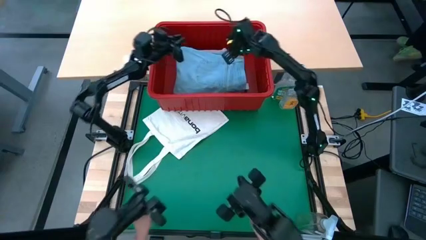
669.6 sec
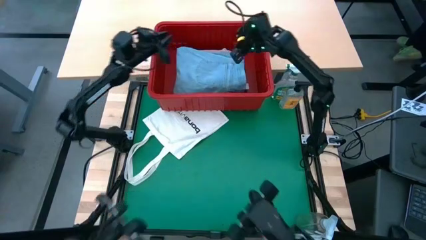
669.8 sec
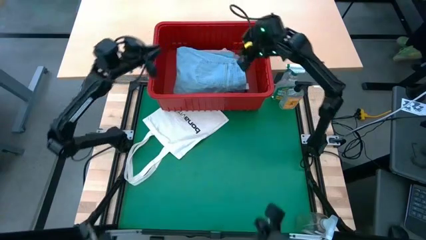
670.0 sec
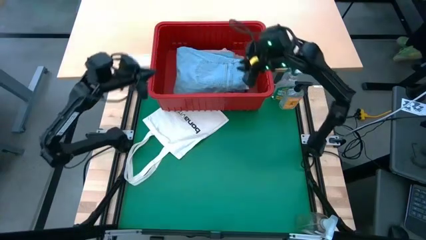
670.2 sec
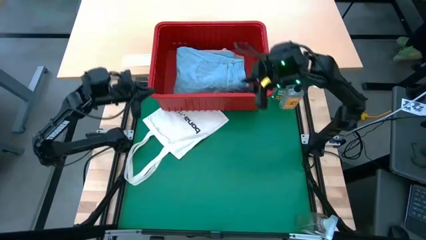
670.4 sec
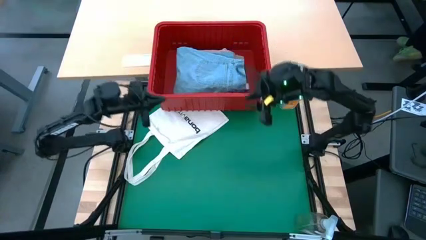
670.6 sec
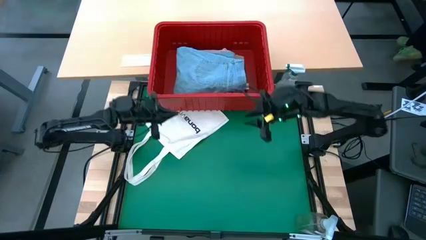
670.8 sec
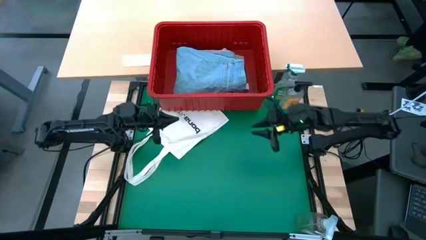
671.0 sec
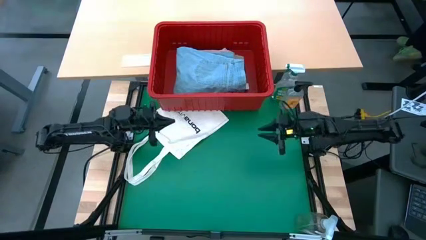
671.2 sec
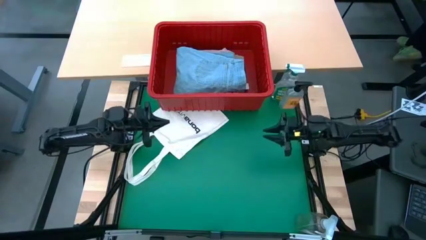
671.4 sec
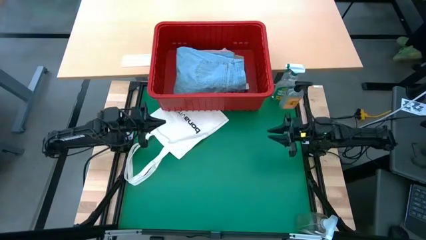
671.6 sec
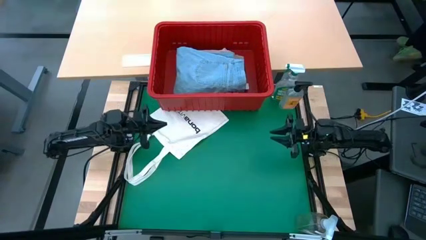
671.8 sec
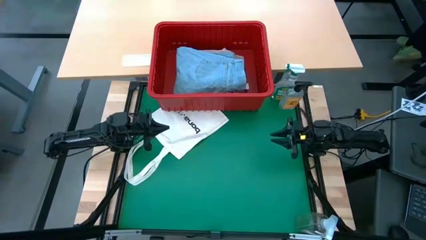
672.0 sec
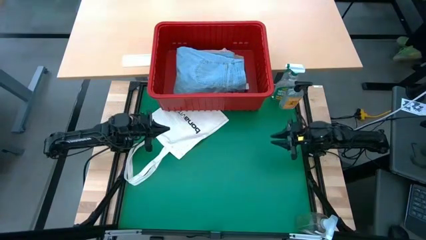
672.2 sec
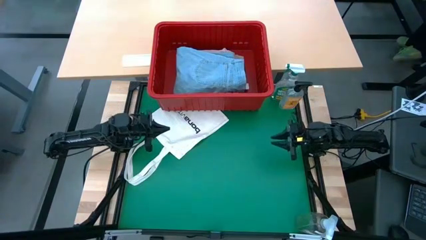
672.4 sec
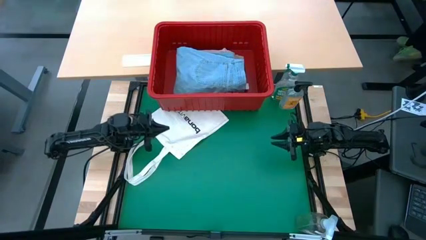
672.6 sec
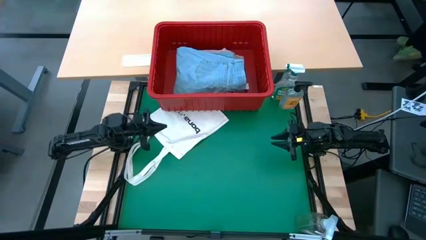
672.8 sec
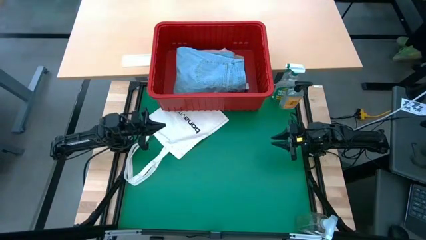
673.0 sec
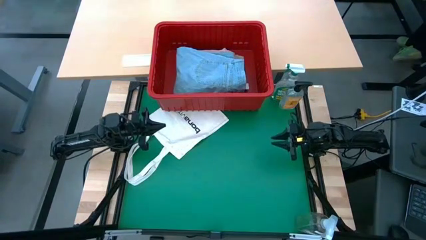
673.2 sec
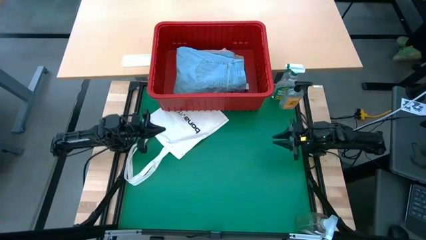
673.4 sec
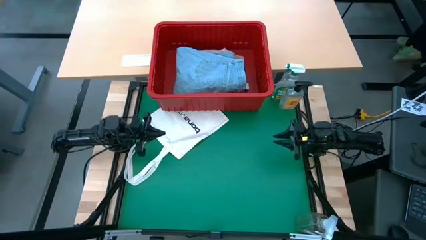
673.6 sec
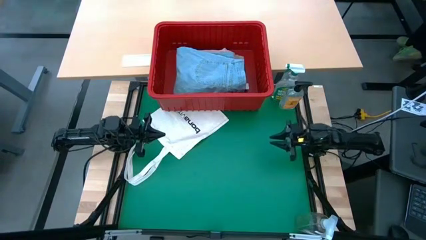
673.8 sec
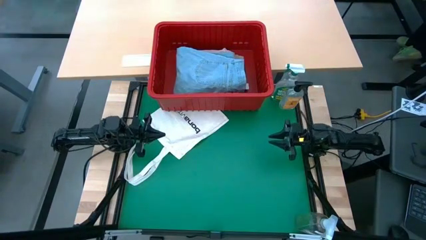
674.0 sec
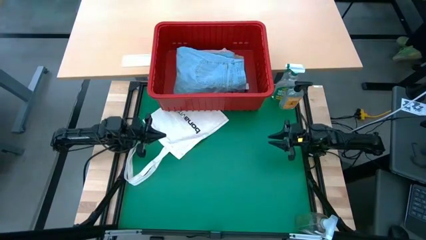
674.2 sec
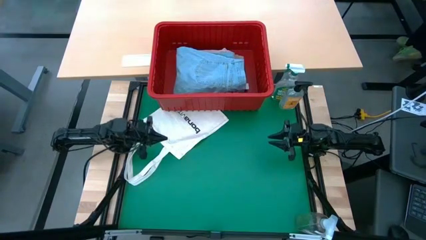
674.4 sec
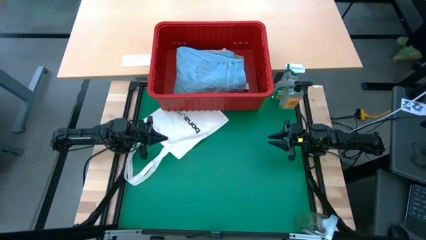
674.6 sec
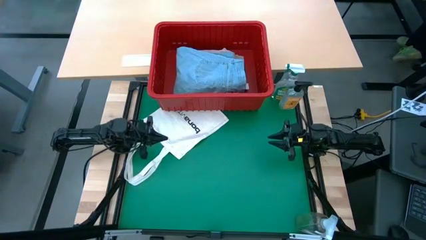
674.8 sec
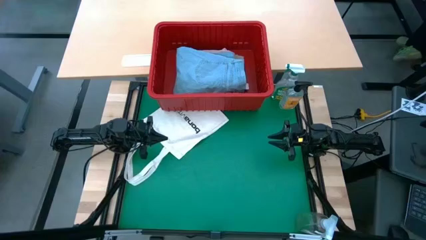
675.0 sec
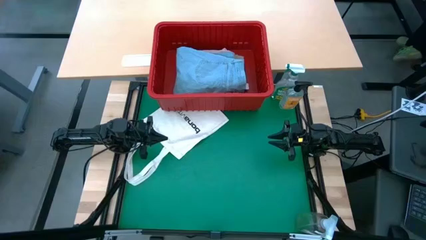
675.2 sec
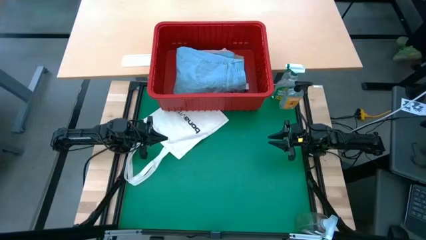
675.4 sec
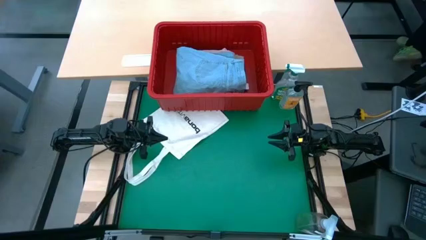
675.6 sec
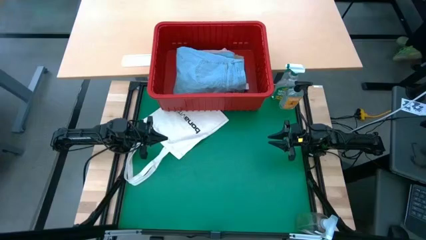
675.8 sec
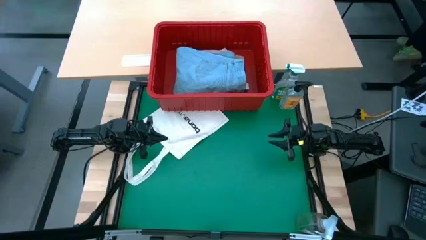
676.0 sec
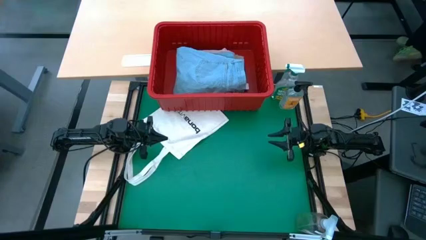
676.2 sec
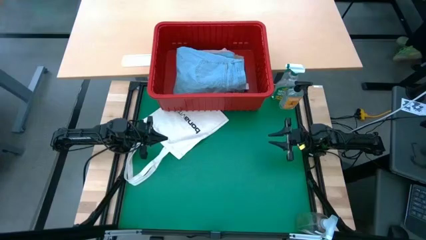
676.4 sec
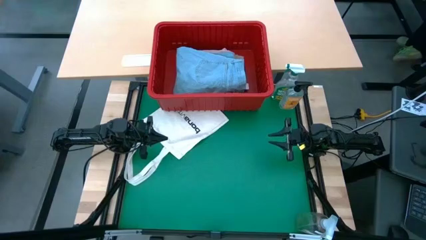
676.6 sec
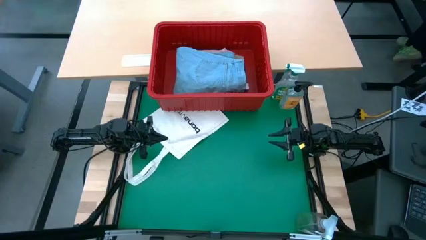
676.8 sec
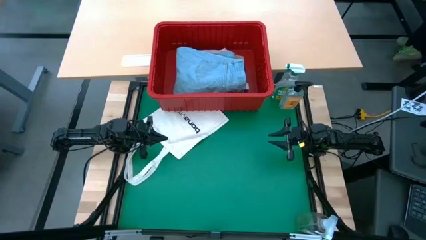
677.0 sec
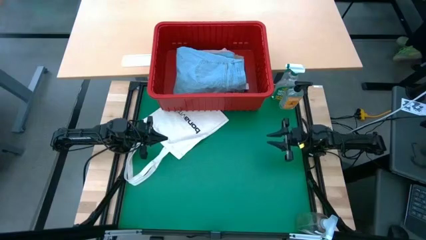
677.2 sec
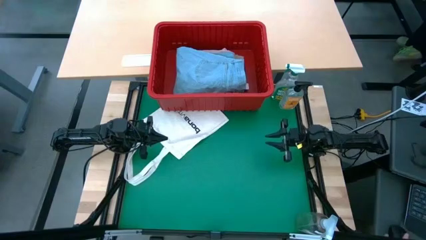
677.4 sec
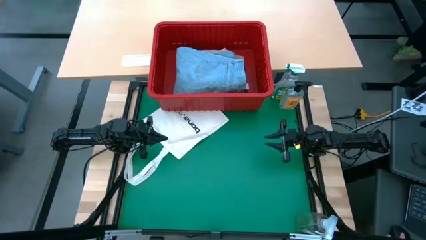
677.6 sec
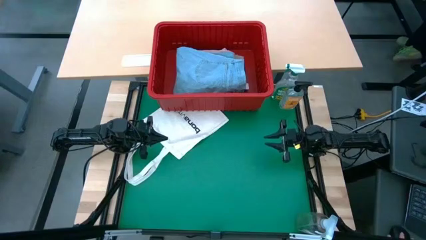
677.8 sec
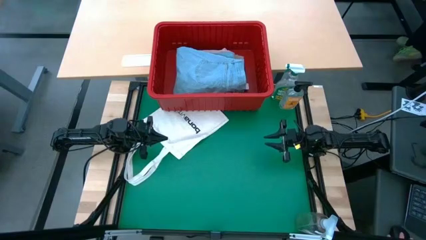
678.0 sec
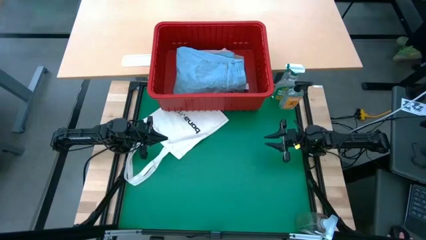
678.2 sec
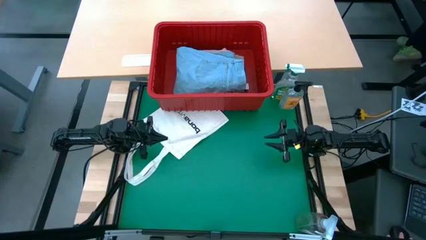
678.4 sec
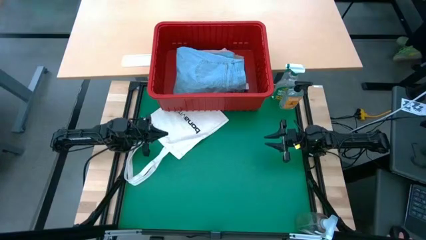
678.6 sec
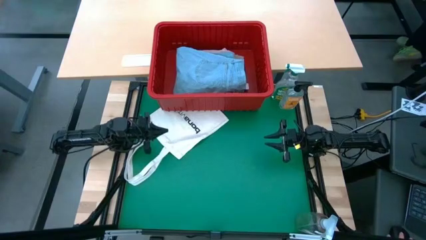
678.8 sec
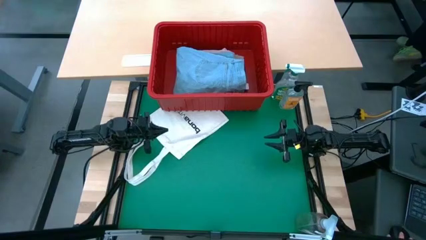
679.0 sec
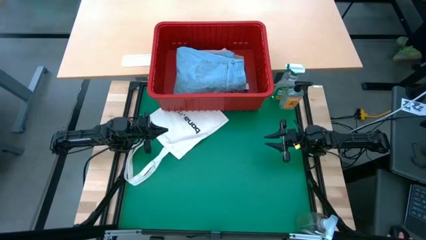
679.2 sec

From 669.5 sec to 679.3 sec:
Task: Fold laundry
Return to Home Position

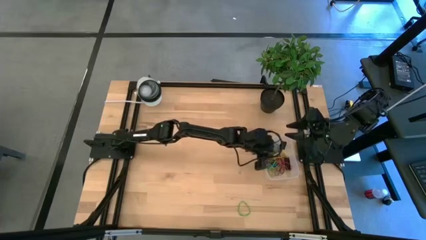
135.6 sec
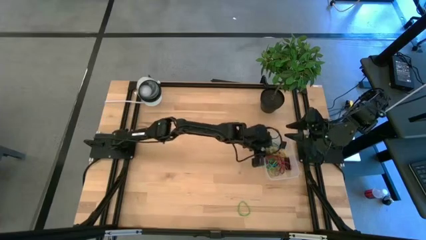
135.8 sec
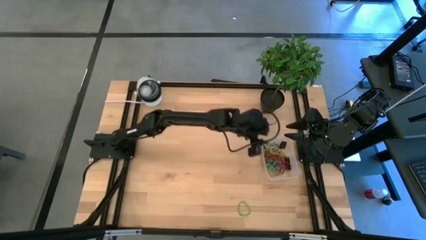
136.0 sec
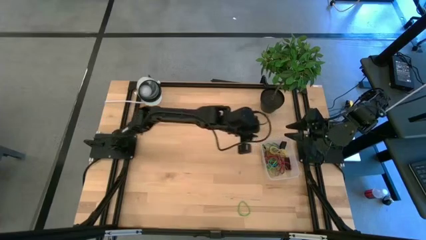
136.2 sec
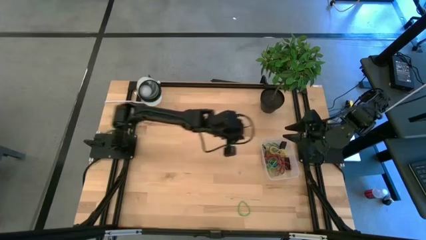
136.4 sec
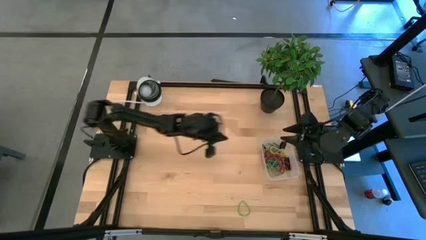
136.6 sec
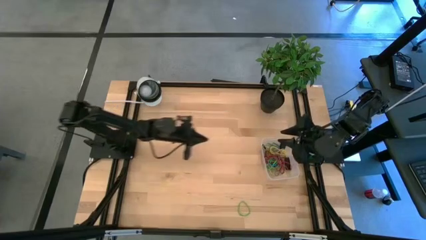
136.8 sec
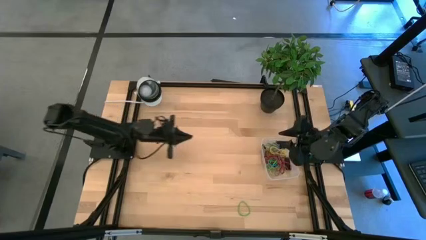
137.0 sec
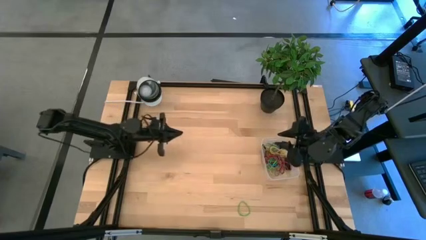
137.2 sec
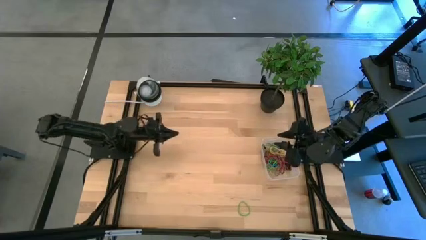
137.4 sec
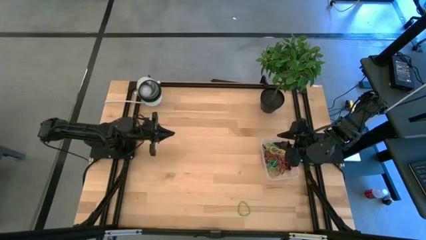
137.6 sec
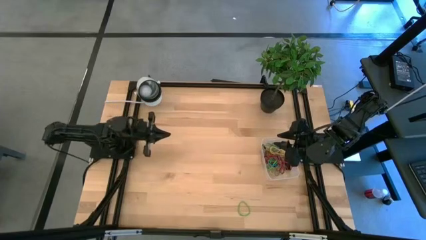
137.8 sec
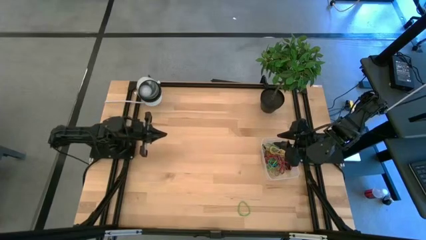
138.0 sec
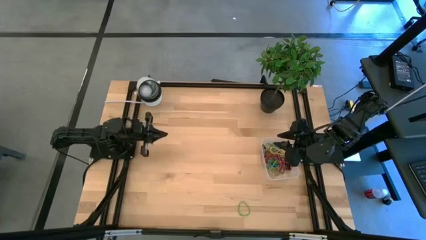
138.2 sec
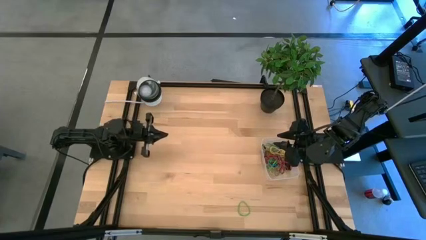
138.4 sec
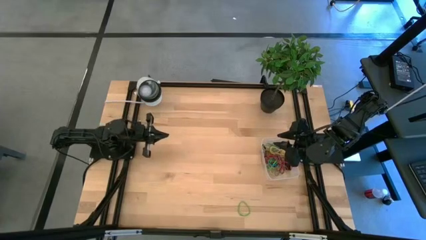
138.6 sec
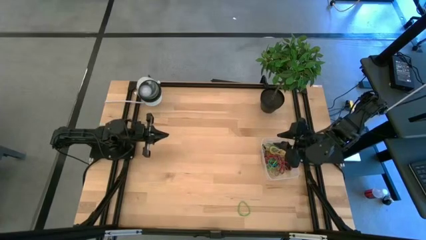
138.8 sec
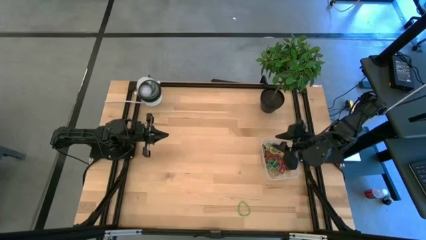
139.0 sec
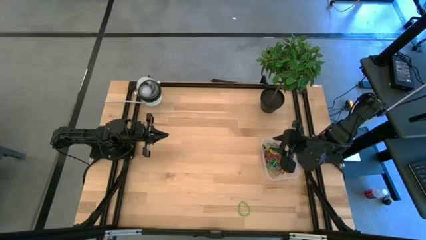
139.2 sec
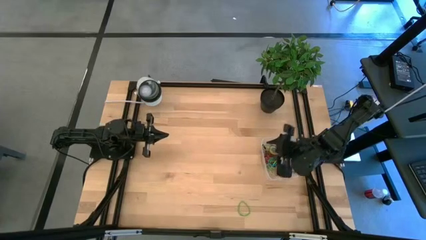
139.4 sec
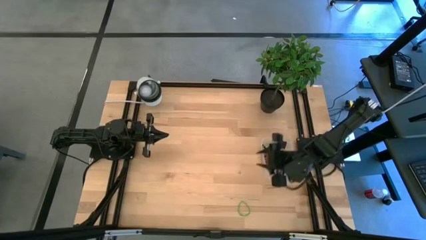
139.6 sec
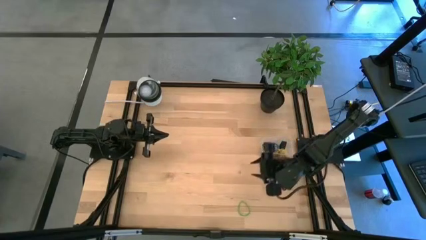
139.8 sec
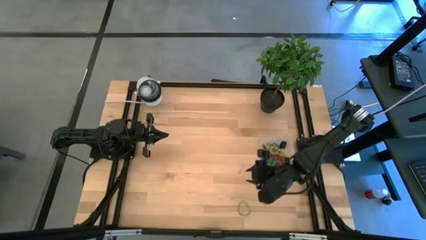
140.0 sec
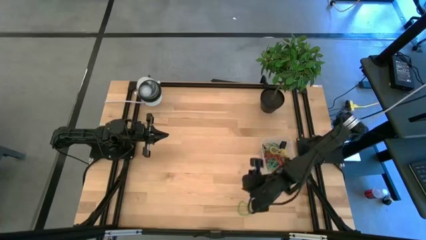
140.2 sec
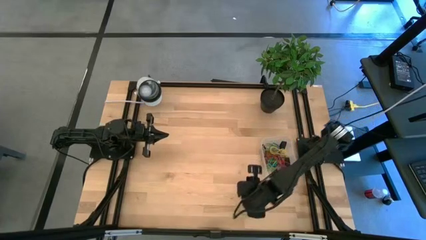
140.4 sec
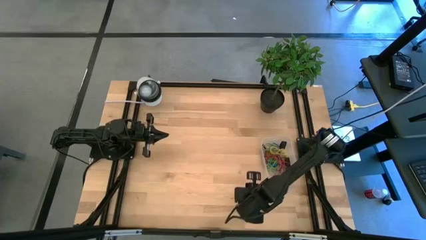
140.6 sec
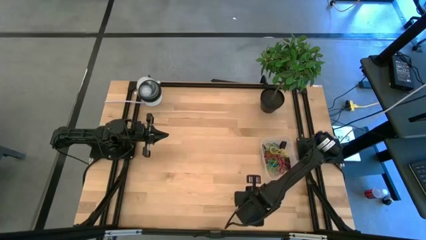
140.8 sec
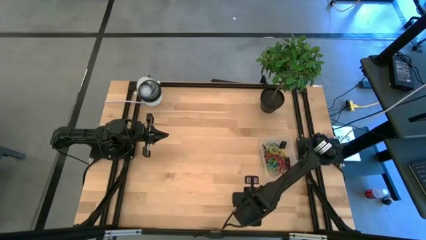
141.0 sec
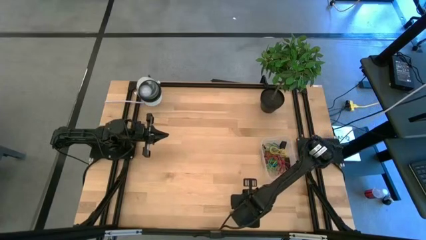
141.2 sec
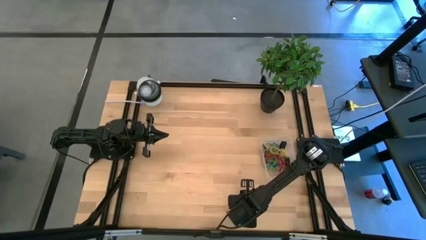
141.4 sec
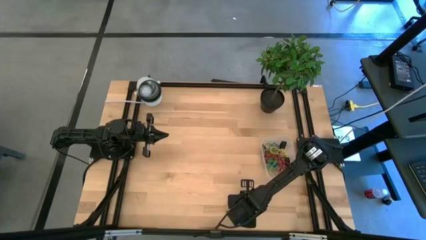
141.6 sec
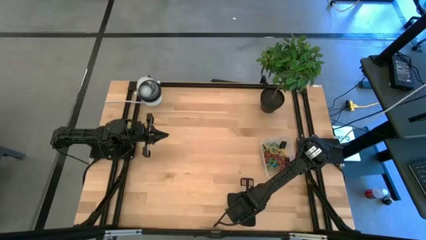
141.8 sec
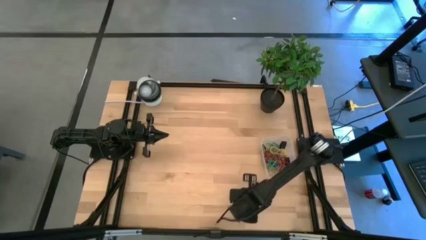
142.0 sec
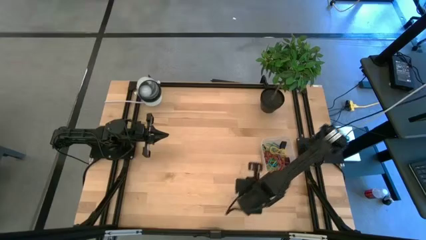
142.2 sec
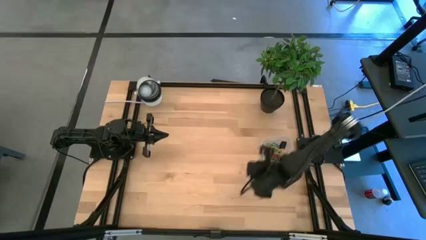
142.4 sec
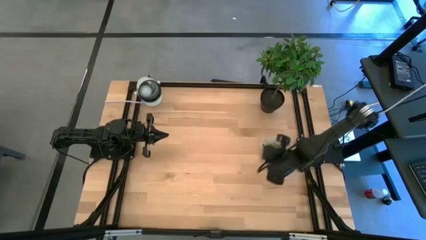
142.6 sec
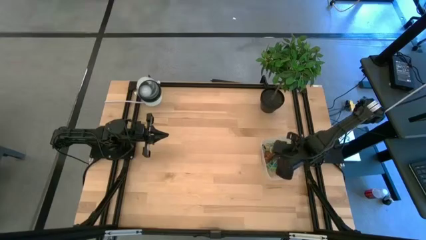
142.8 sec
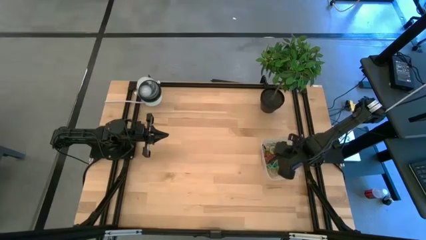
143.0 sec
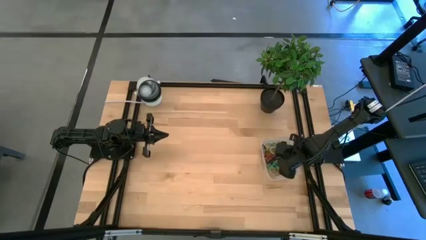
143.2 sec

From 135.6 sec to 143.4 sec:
Task: Pick and place rubber bands into bin
Put the green rubber band into the transparent bin
